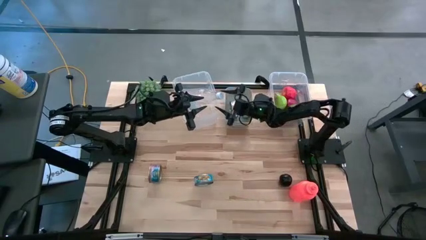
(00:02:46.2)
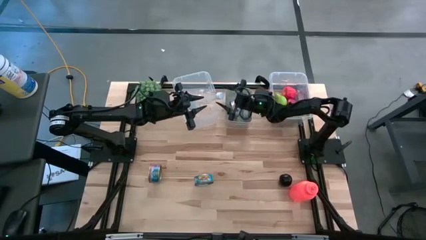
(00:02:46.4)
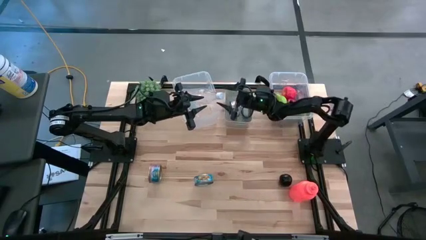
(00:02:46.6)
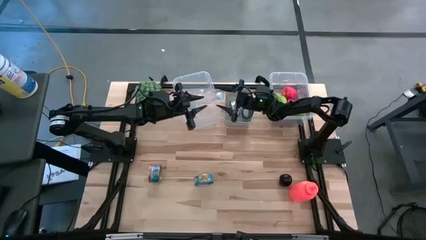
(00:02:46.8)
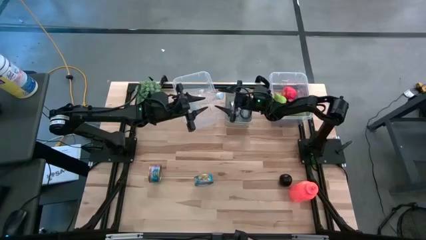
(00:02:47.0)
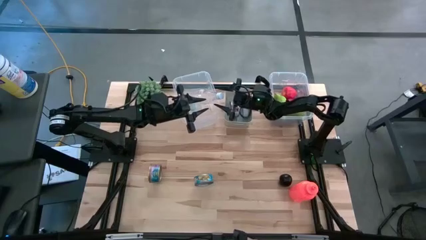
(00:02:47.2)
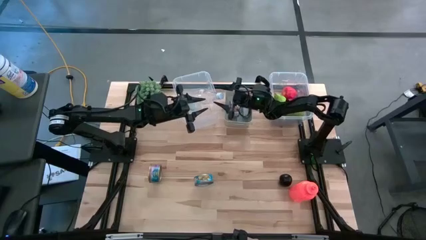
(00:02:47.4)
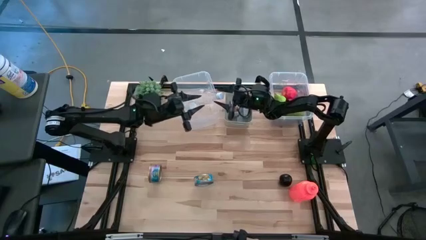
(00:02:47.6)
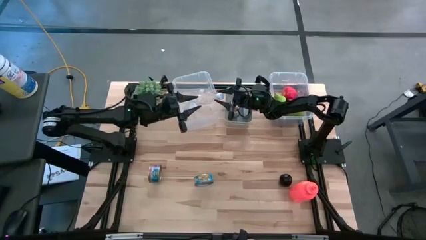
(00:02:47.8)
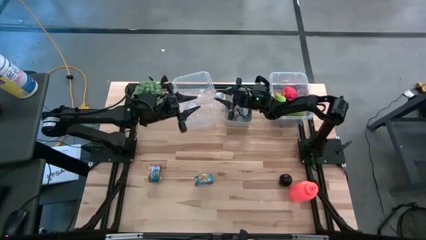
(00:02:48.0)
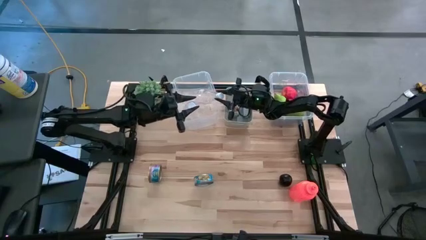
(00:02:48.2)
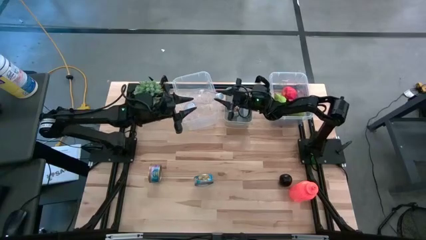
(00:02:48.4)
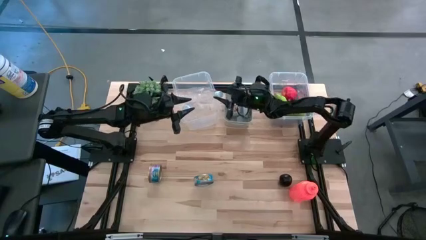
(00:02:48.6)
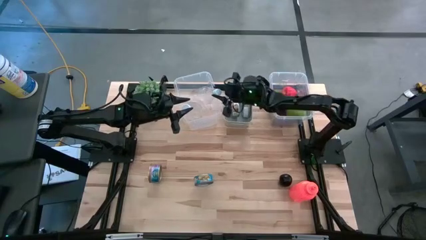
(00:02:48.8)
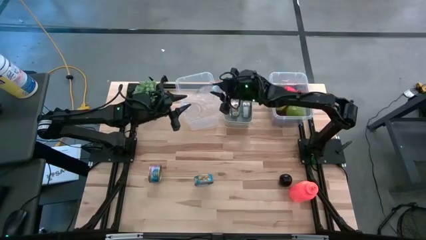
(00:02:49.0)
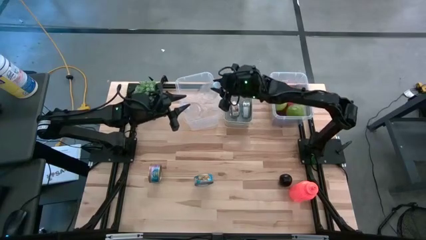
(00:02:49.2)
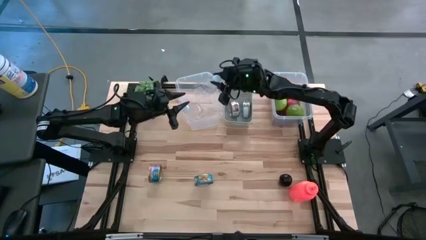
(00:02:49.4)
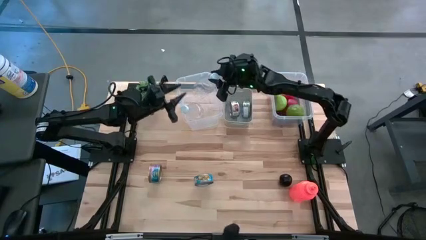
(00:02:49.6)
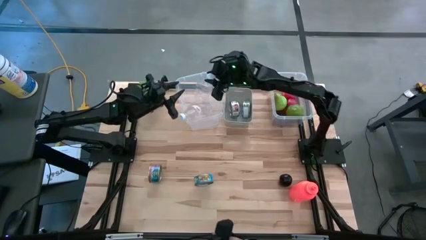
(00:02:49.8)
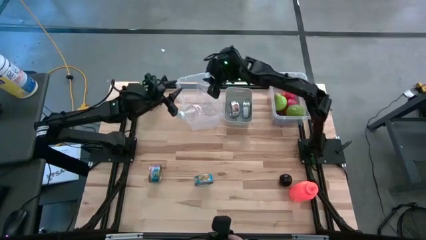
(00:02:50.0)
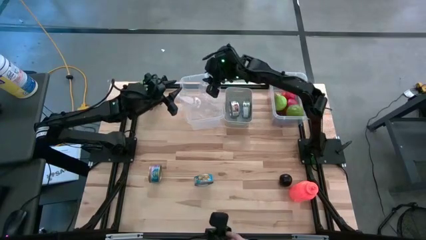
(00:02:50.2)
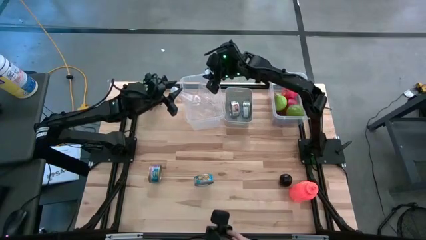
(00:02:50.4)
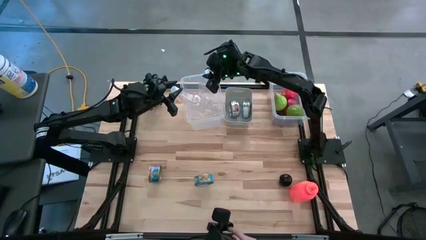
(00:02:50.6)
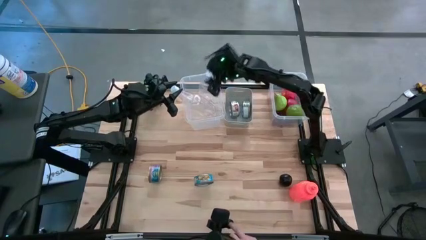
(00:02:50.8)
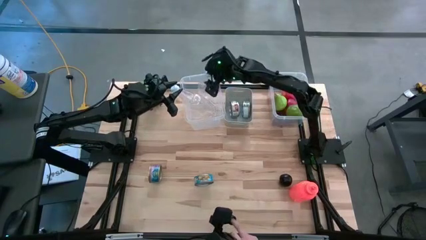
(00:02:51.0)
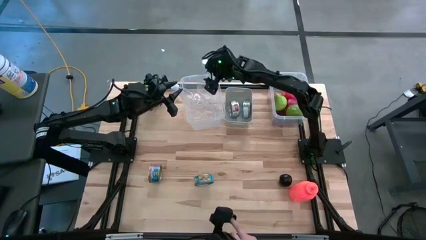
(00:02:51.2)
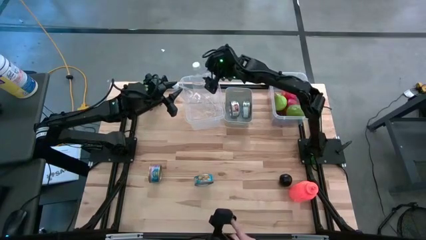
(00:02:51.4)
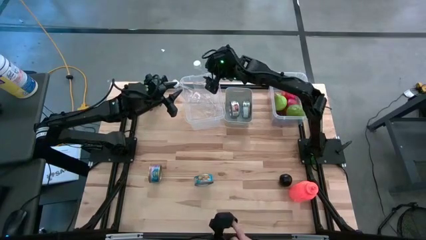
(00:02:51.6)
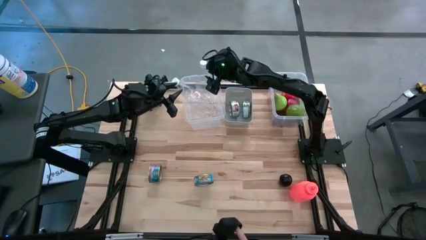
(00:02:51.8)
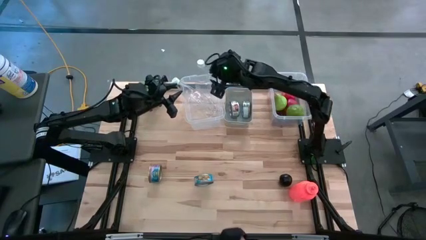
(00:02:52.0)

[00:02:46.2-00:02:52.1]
Task: Pick & Place Food Item
Put the transparent bottle into the left transparent bin upright

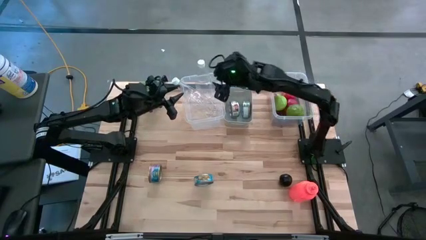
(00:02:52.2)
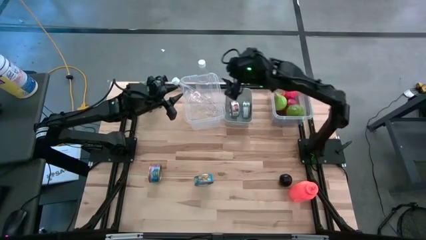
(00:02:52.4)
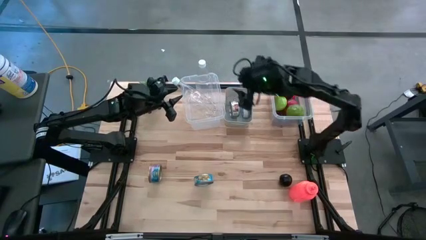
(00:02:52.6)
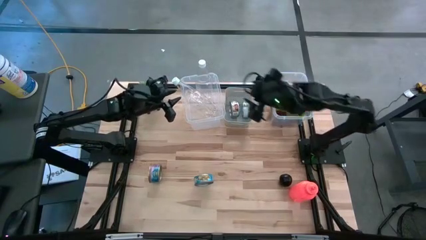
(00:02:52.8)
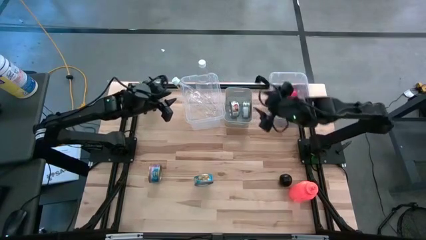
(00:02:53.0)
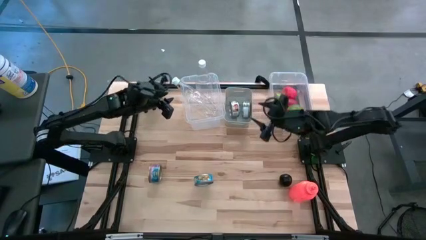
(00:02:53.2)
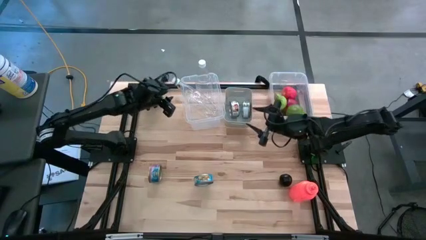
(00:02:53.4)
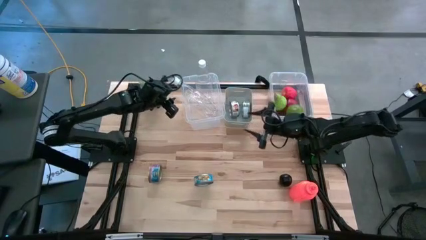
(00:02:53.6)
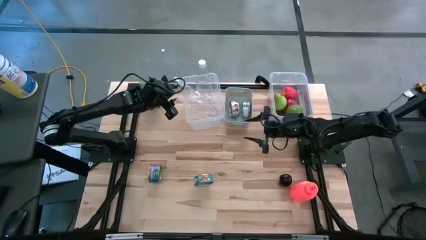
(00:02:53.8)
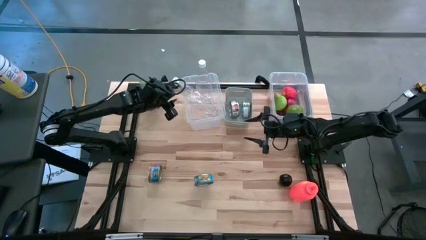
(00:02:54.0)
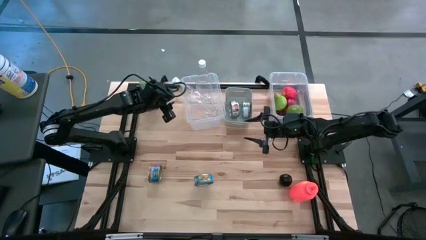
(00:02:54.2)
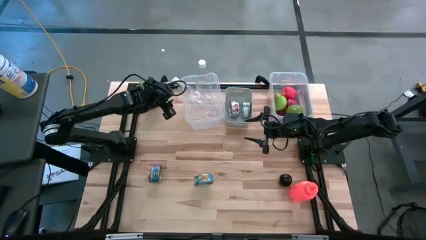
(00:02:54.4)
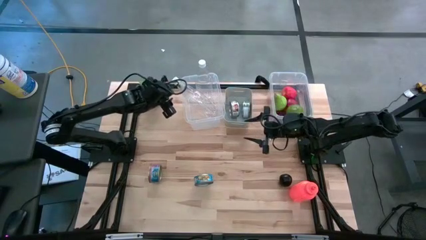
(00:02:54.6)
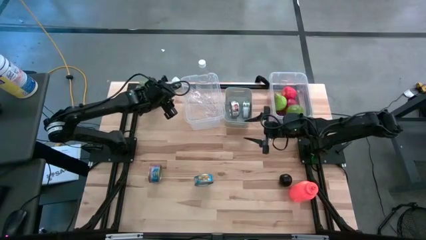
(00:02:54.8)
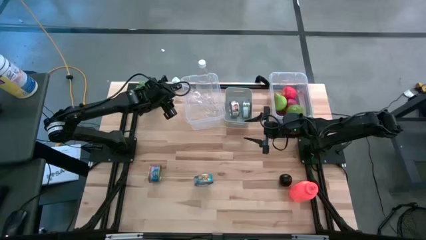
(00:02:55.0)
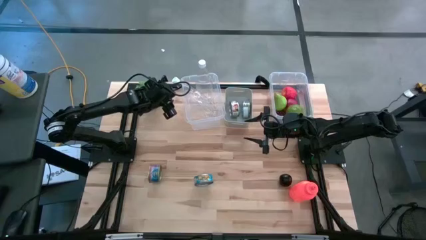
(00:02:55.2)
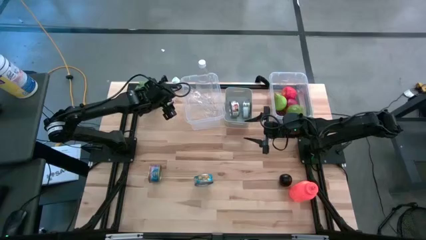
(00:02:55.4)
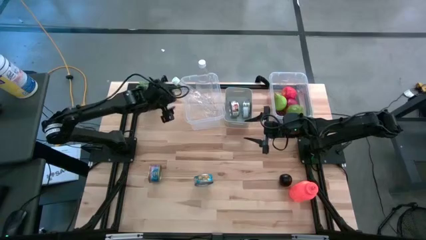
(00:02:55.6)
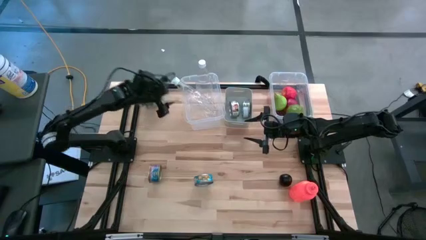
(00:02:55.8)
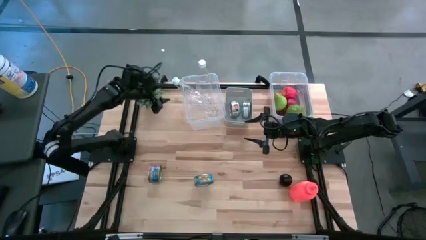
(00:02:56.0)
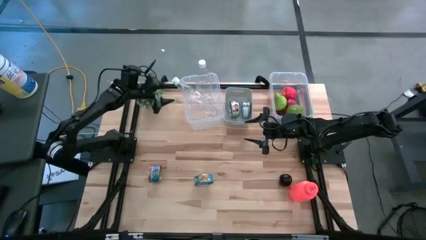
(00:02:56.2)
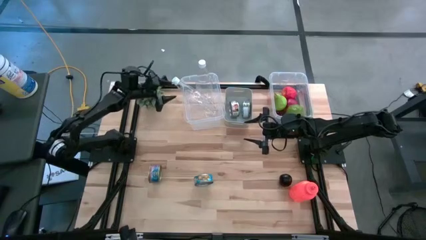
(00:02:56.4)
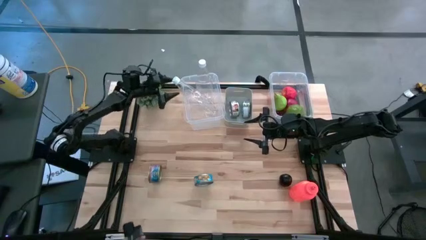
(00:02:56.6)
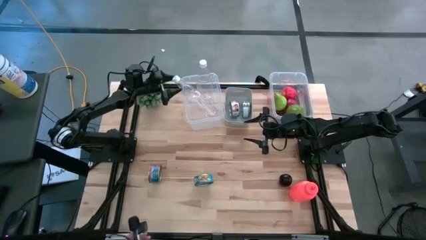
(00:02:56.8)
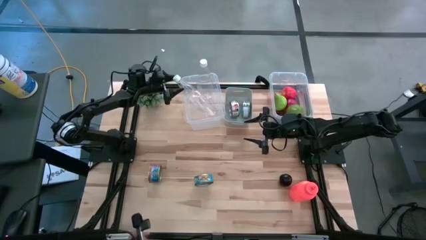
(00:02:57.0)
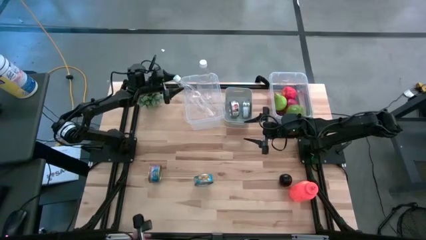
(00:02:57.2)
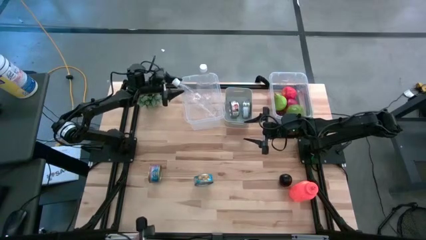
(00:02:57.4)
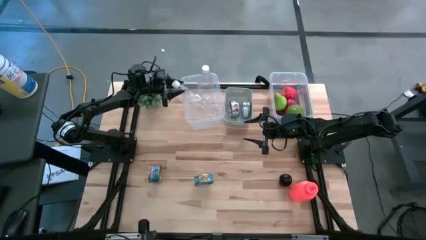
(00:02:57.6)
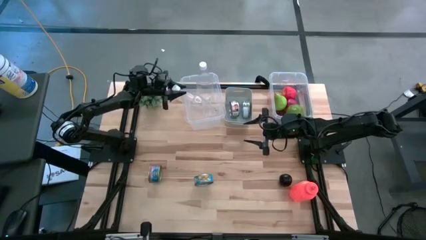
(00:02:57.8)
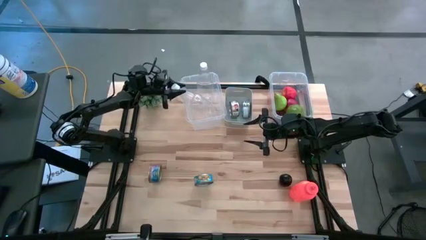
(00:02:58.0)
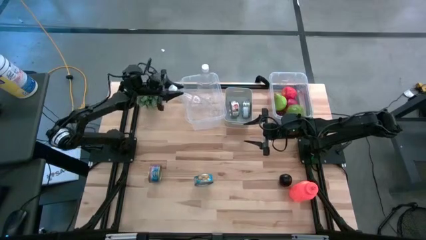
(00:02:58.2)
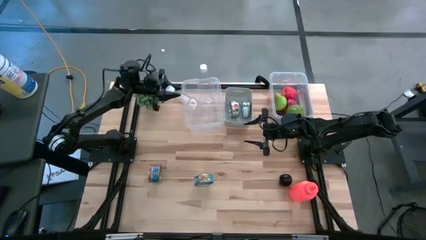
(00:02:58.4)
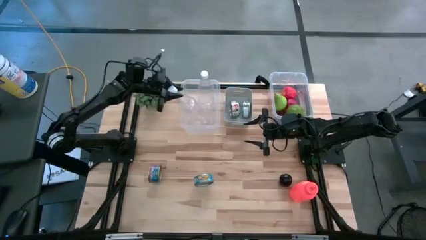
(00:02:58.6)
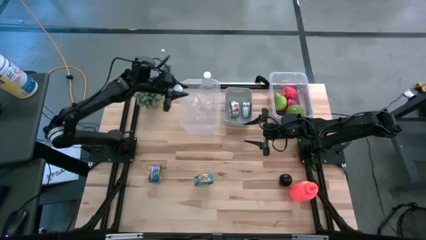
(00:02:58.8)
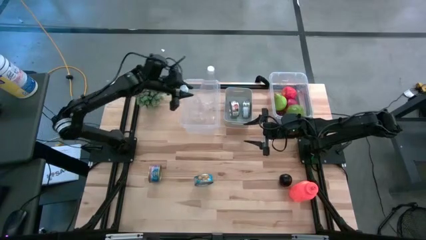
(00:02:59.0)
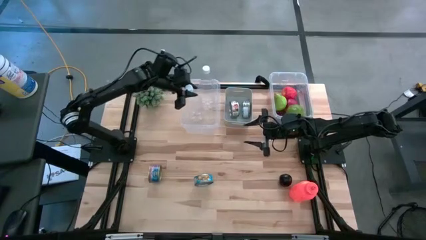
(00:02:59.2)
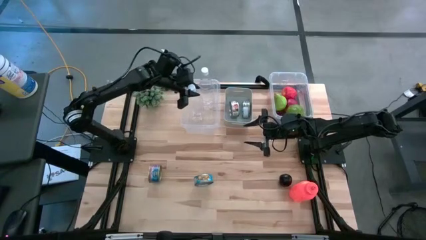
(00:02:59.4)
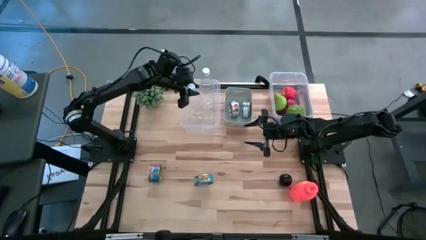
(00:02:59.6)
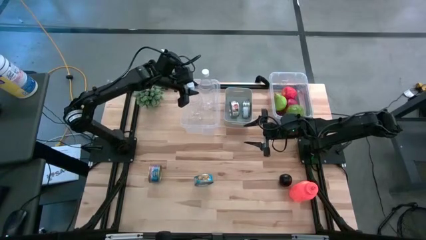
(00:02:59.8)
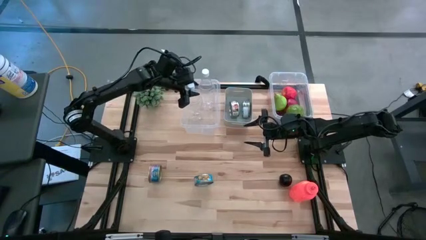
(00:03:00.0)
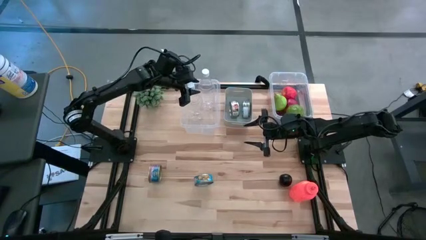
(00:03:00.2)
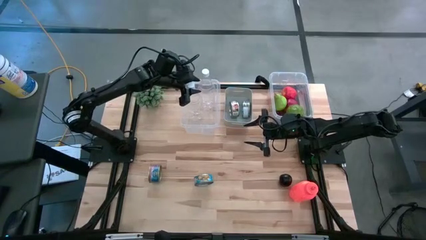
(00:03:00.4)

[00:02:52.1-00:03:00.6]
Adjust the transparent bottle
